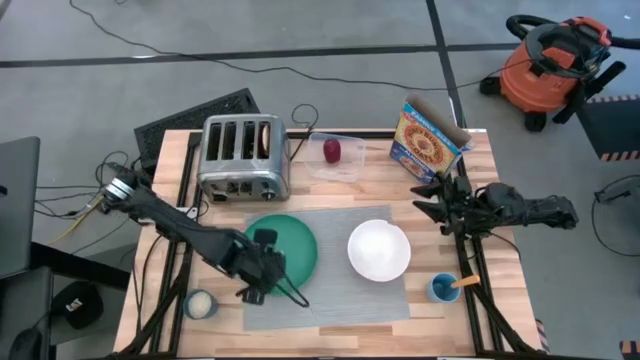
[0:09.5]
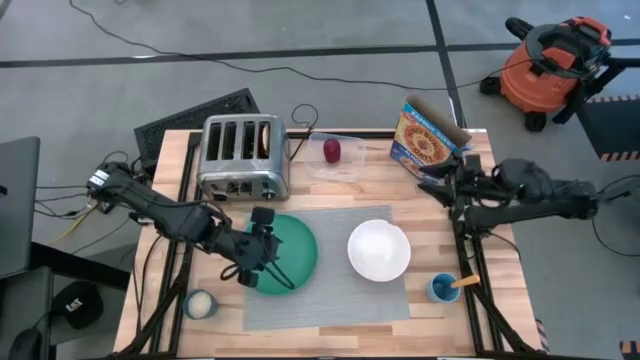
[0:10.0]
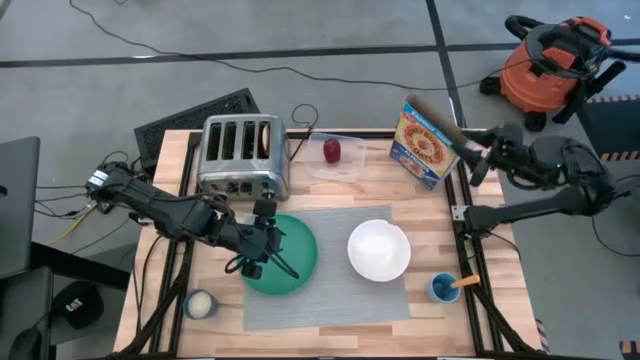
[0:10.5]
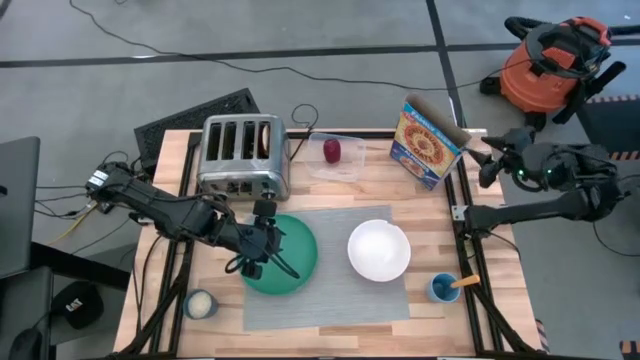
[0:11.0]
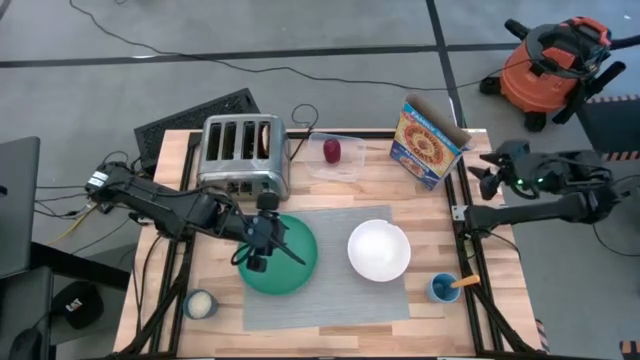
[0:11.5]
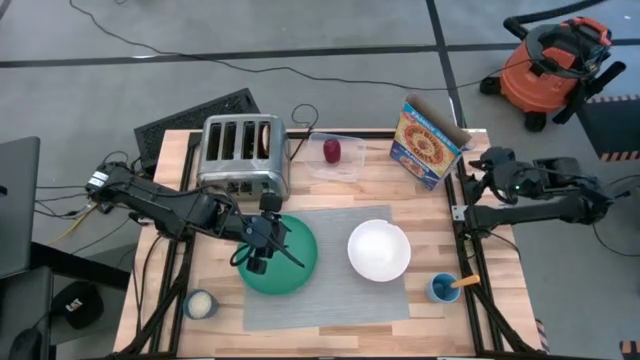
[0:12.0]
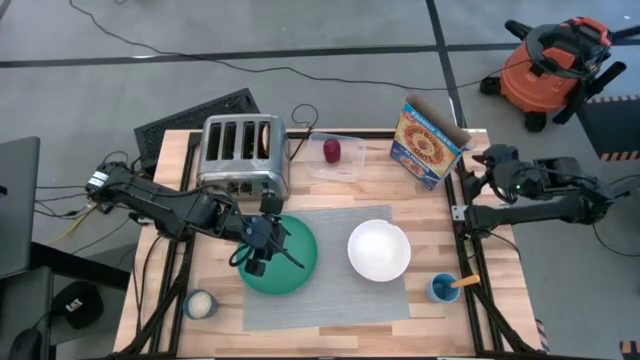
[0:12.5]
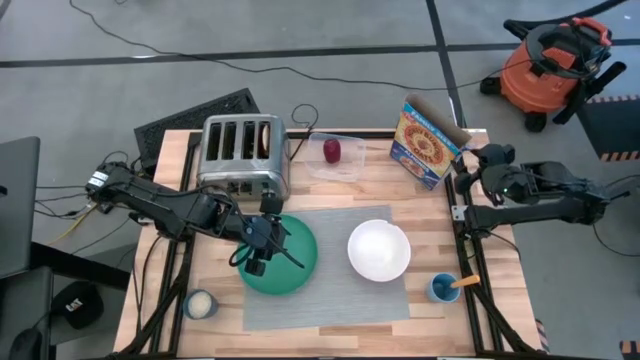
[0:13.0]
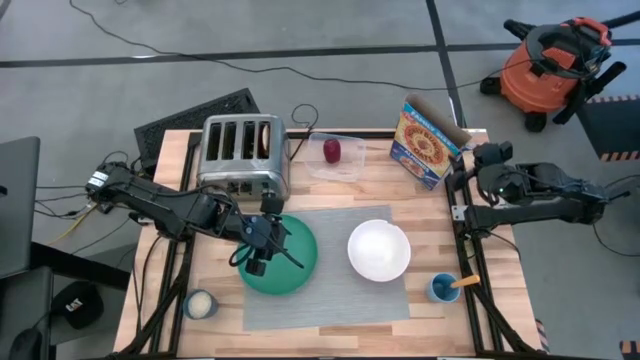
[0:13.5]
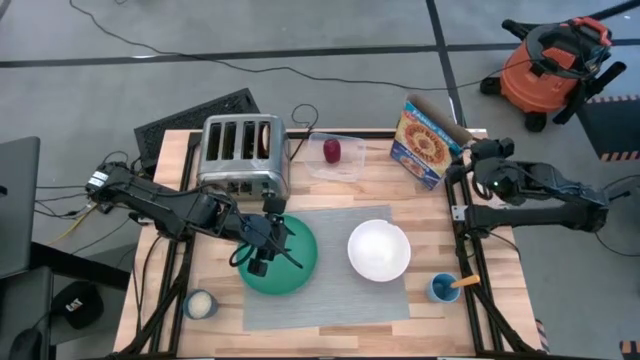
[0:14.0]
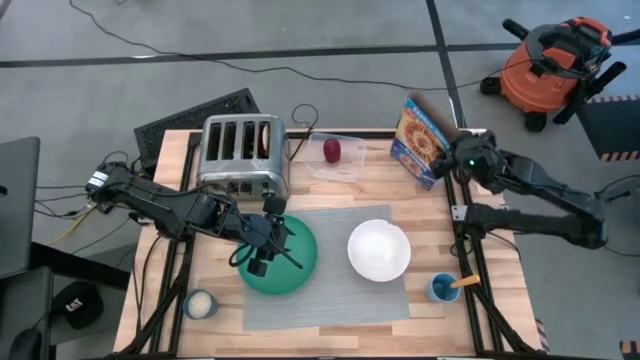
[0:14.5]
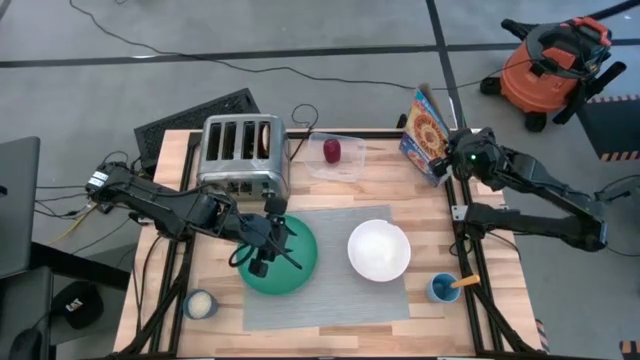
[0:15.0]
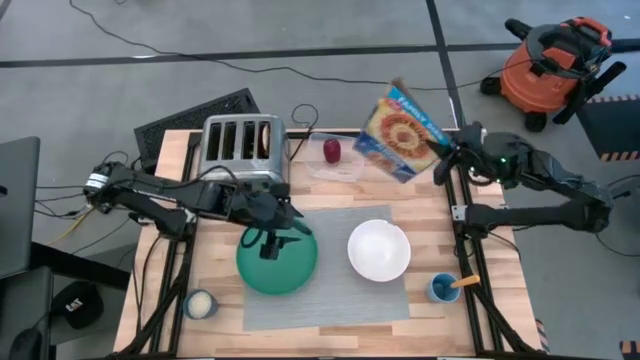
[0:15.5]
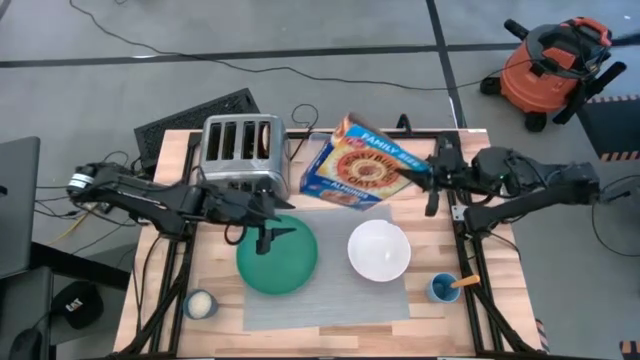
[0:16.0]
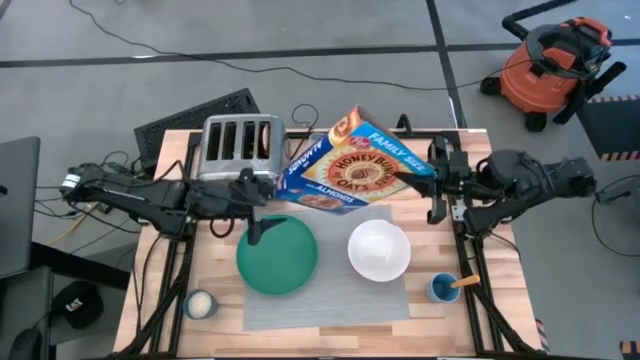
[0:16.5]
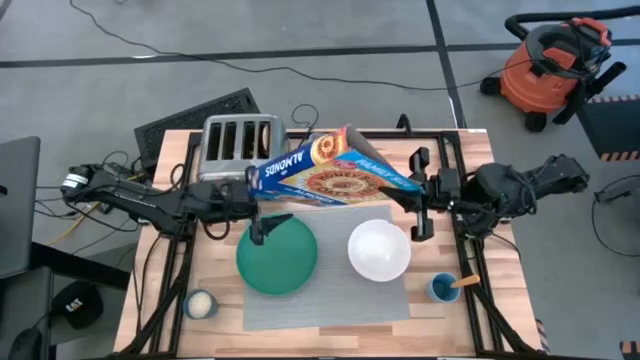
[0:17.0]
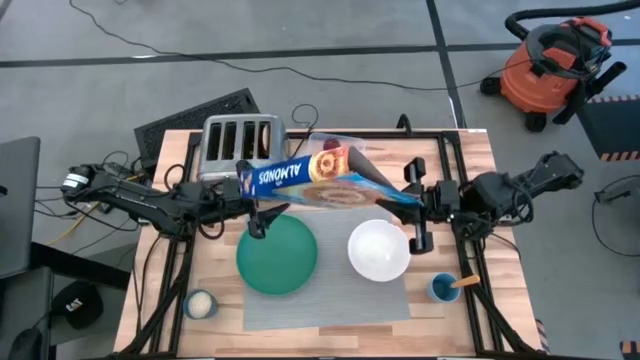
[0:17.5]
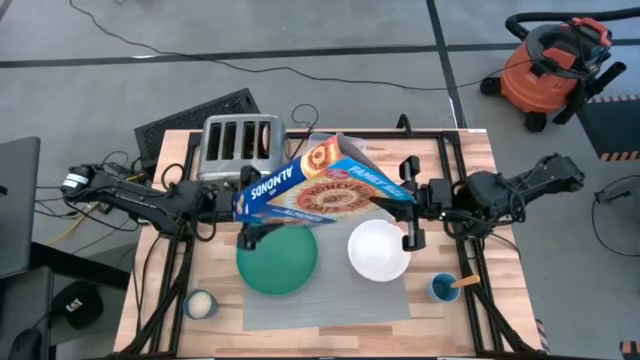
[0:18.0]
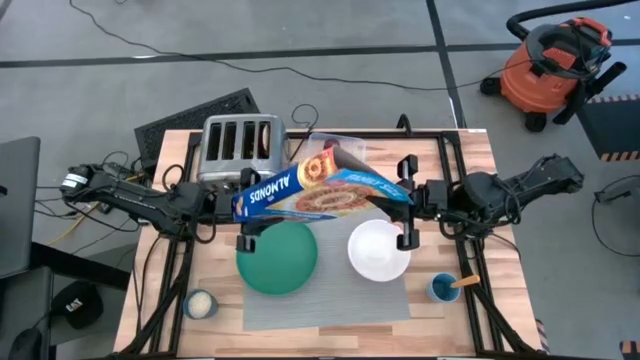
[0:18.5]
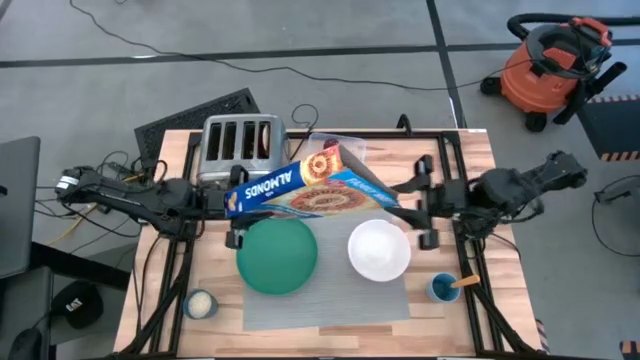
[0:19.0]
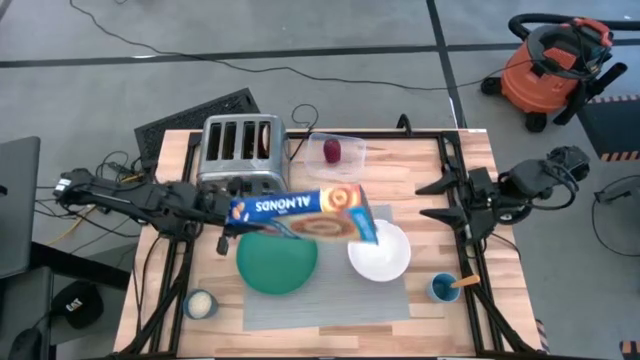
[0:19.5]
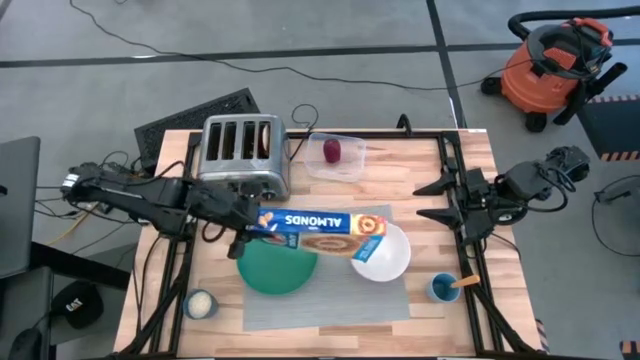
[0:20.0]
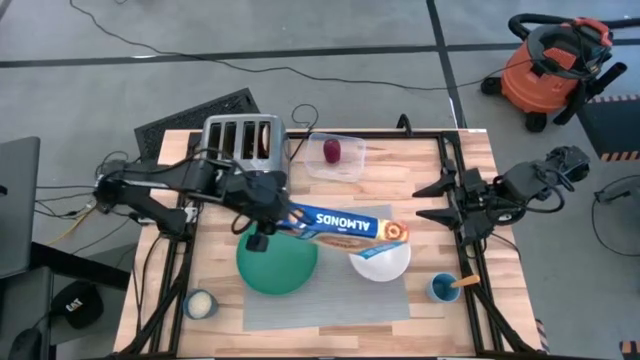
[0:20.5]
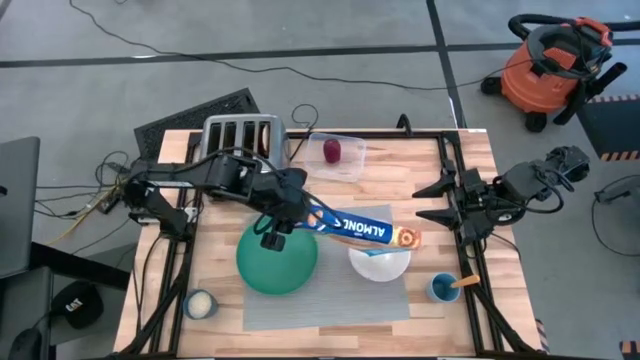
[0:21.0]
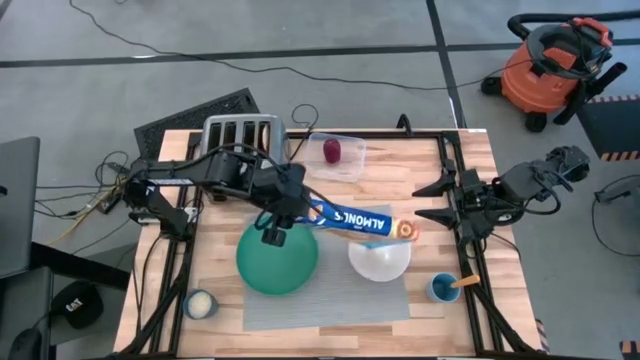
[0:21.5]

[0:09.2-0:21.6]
Task: Arrange a breakfast setting
Pour the cereal into the white bowl
